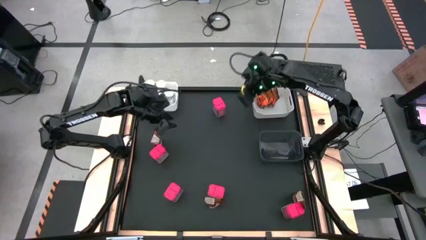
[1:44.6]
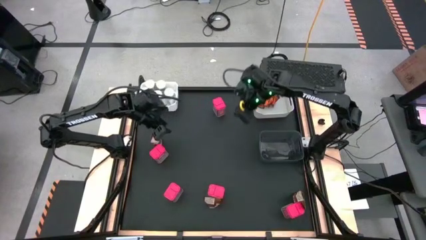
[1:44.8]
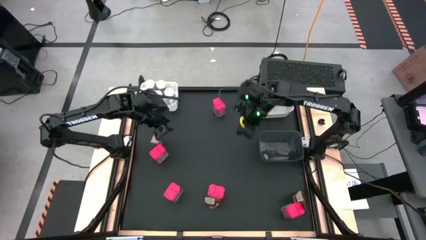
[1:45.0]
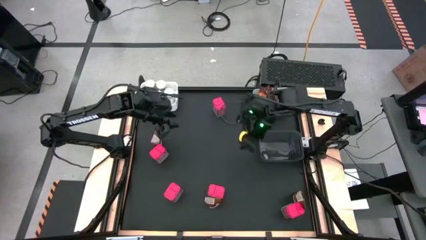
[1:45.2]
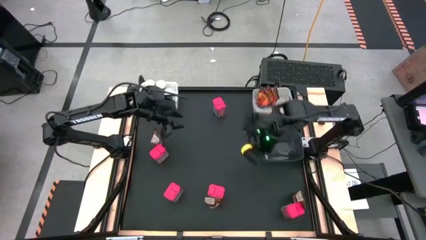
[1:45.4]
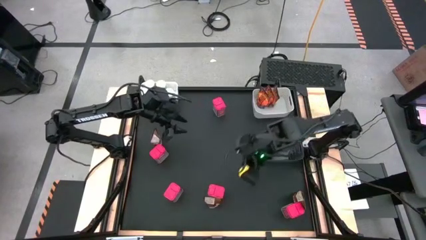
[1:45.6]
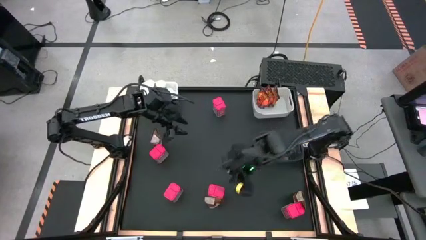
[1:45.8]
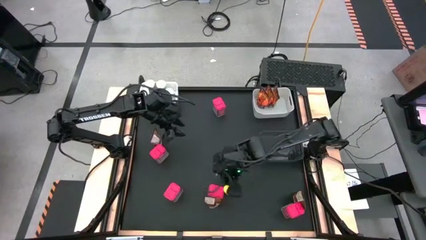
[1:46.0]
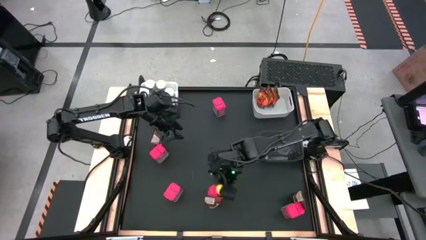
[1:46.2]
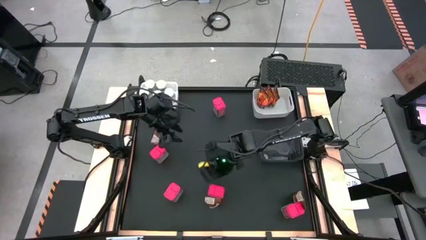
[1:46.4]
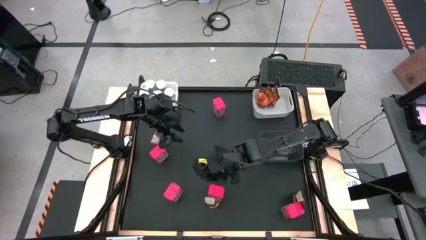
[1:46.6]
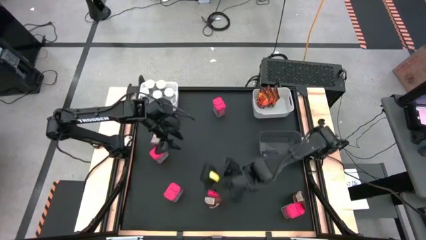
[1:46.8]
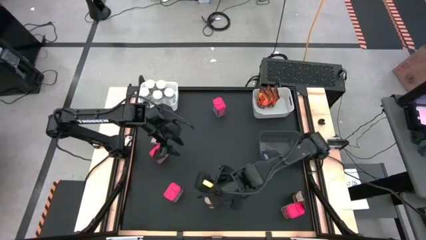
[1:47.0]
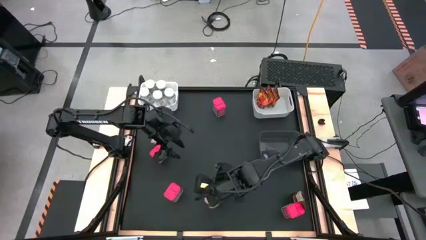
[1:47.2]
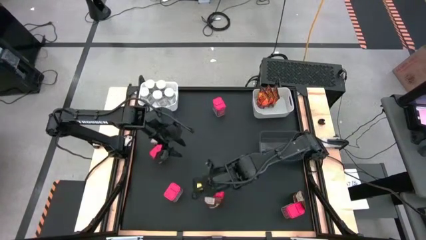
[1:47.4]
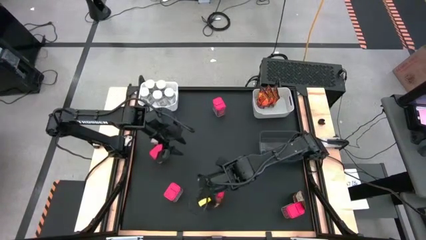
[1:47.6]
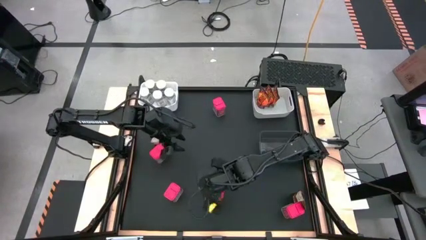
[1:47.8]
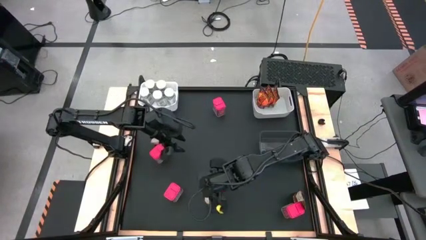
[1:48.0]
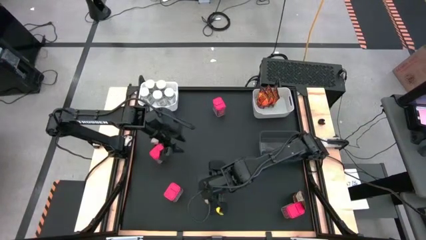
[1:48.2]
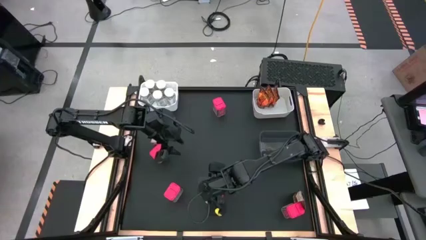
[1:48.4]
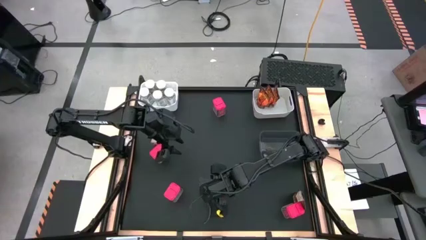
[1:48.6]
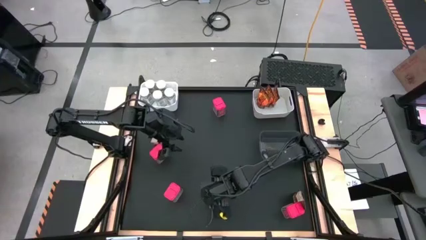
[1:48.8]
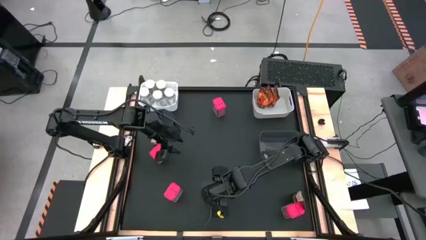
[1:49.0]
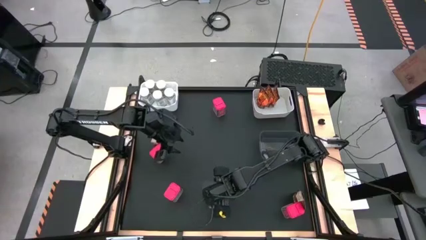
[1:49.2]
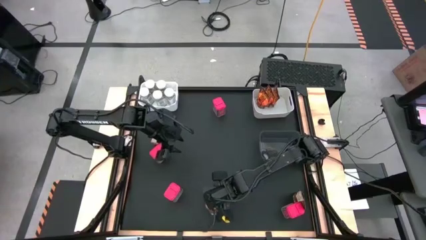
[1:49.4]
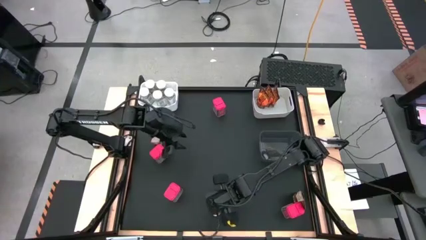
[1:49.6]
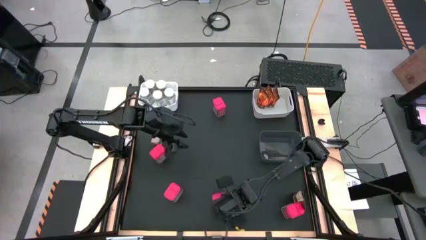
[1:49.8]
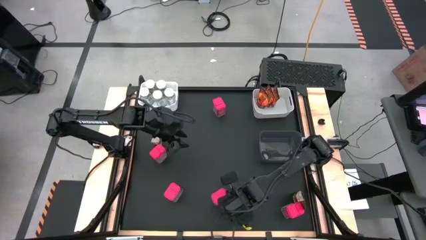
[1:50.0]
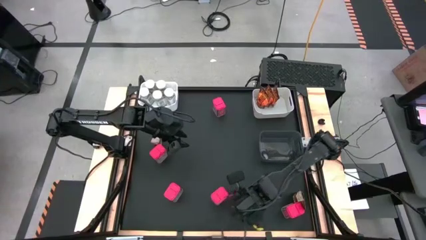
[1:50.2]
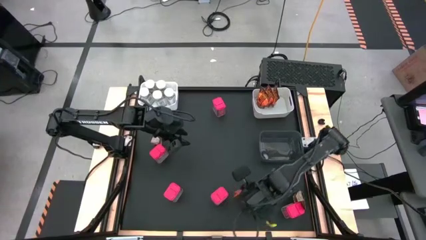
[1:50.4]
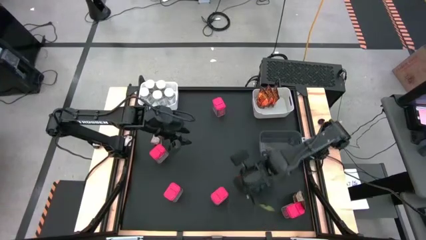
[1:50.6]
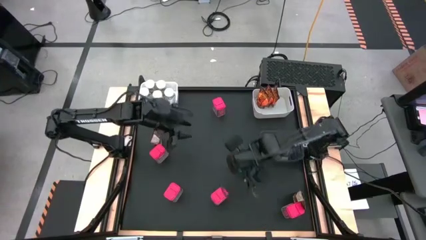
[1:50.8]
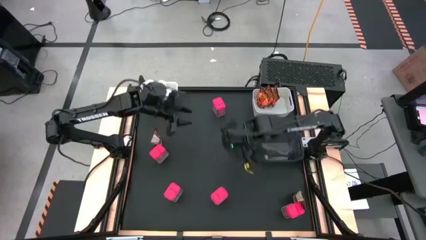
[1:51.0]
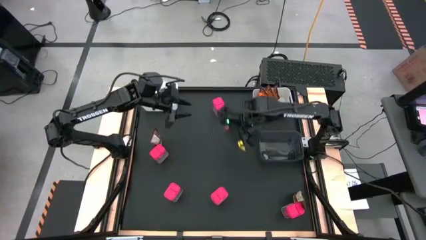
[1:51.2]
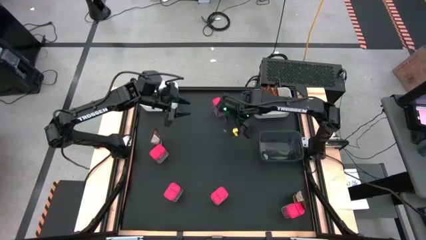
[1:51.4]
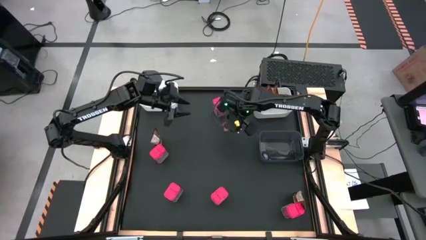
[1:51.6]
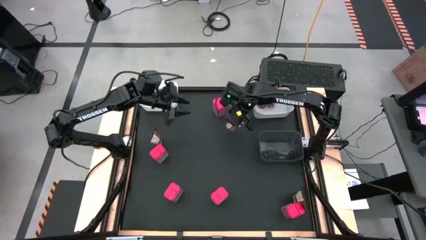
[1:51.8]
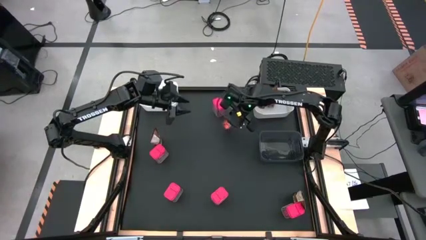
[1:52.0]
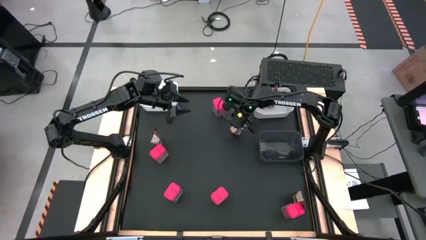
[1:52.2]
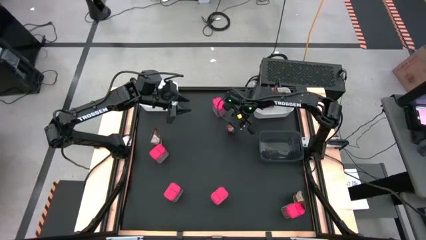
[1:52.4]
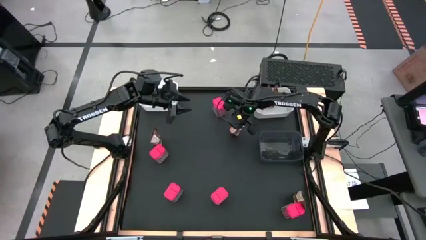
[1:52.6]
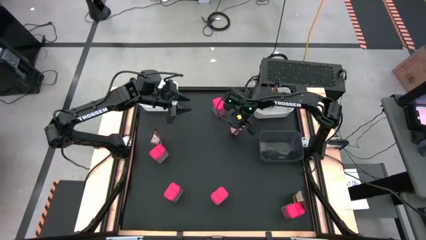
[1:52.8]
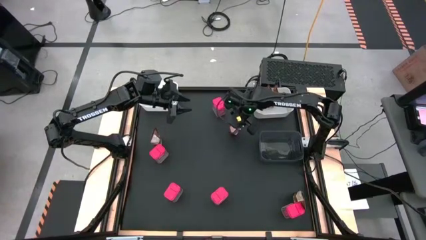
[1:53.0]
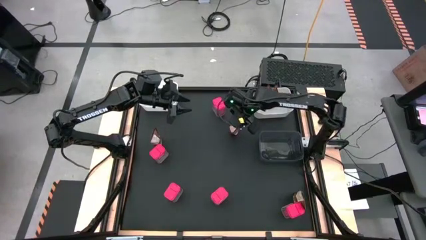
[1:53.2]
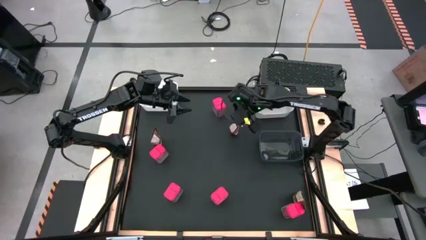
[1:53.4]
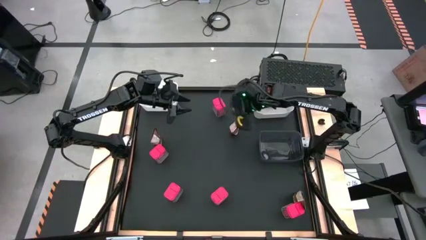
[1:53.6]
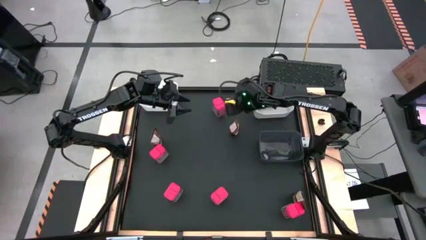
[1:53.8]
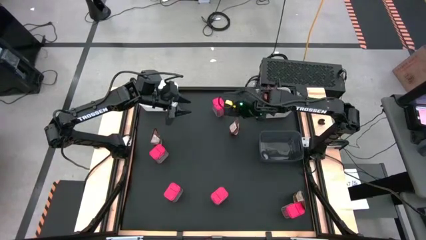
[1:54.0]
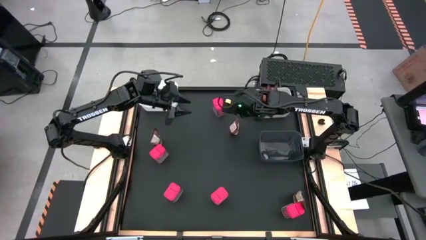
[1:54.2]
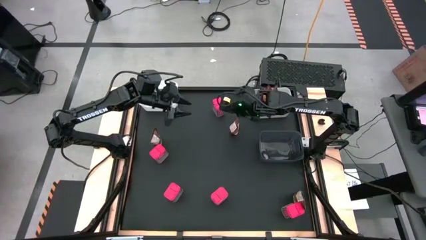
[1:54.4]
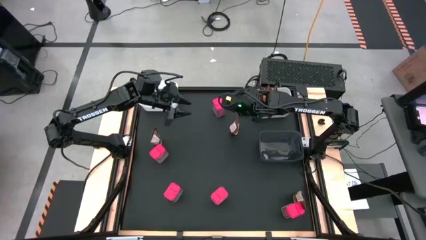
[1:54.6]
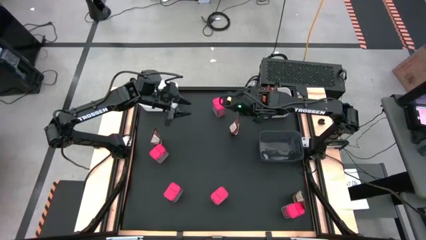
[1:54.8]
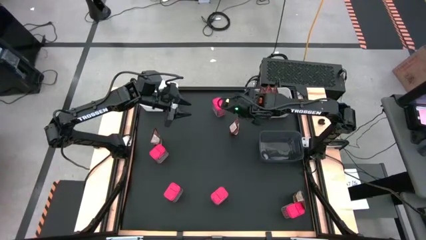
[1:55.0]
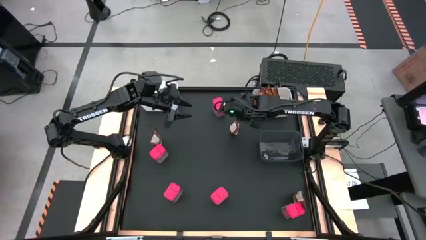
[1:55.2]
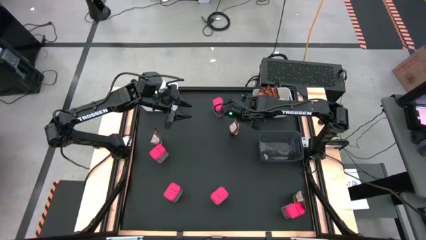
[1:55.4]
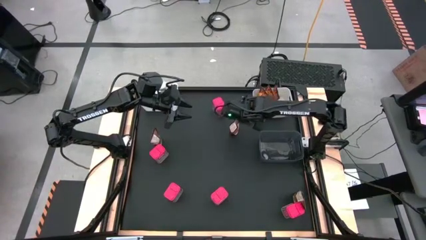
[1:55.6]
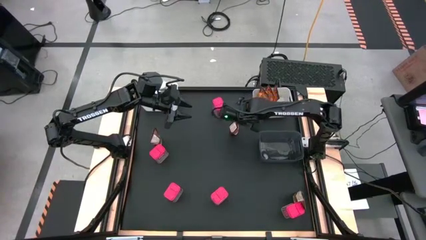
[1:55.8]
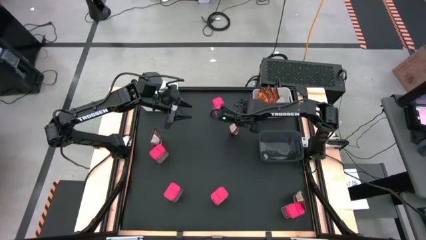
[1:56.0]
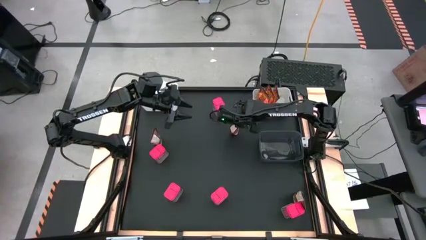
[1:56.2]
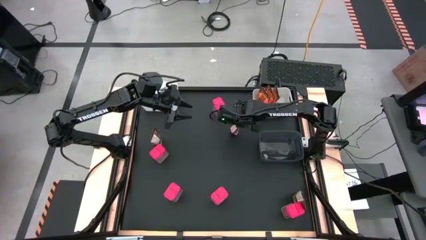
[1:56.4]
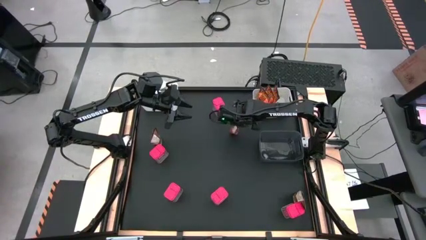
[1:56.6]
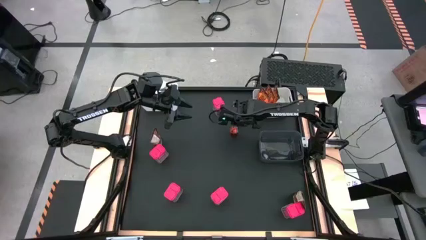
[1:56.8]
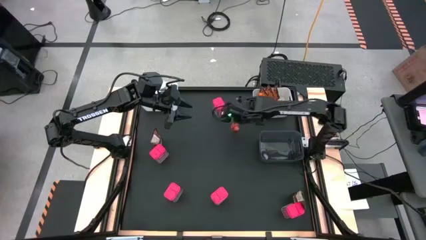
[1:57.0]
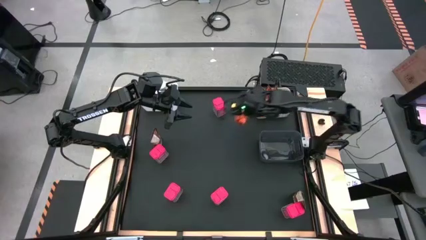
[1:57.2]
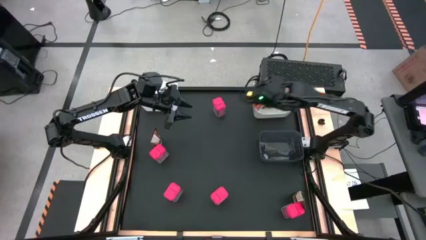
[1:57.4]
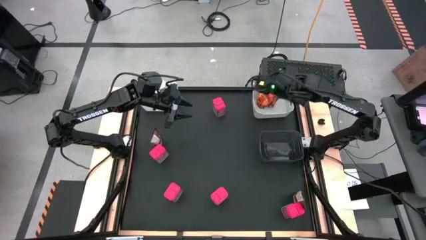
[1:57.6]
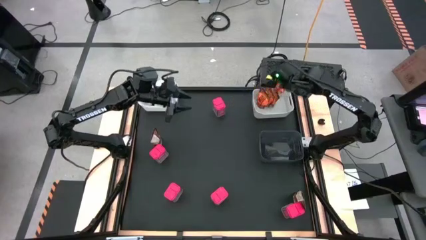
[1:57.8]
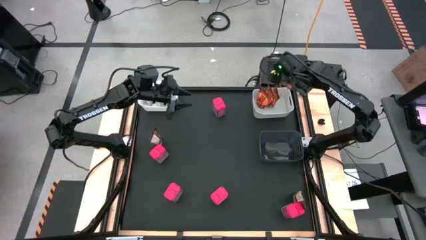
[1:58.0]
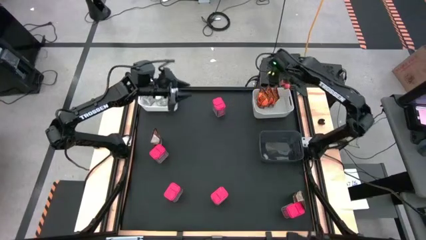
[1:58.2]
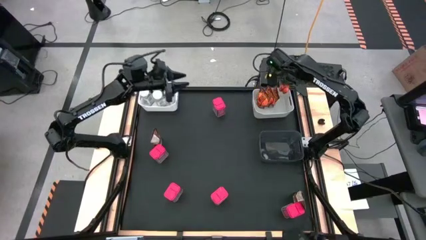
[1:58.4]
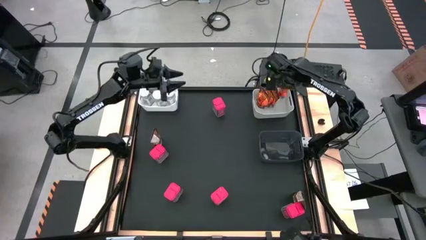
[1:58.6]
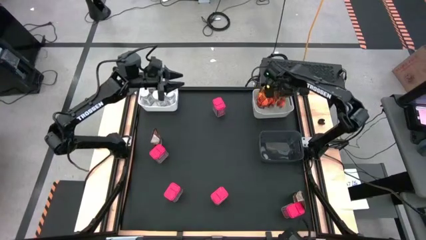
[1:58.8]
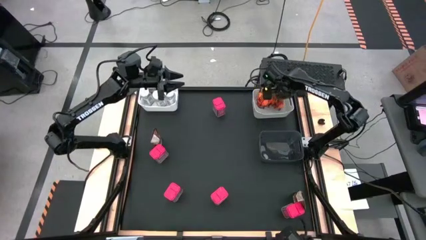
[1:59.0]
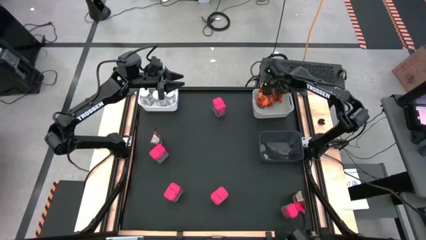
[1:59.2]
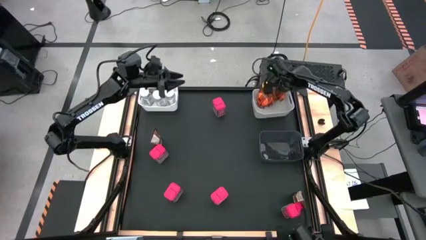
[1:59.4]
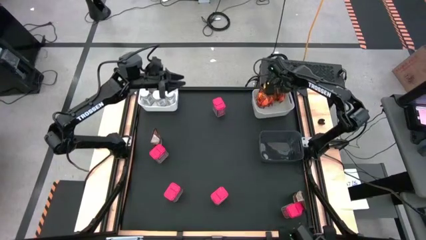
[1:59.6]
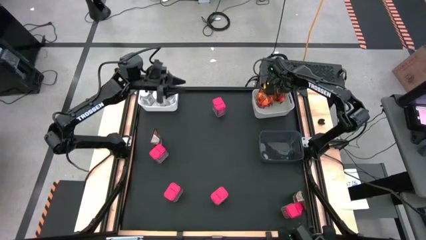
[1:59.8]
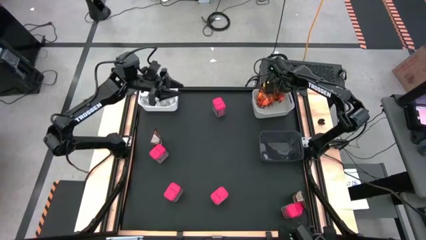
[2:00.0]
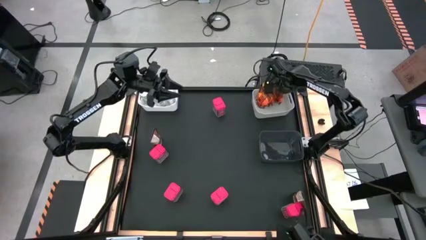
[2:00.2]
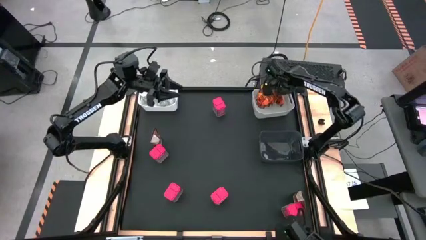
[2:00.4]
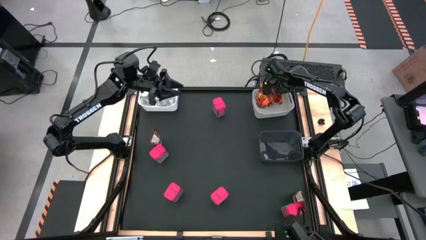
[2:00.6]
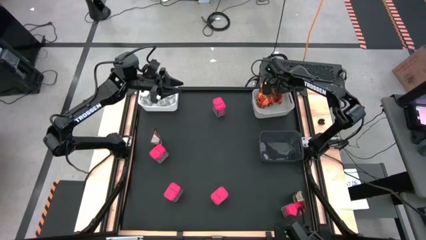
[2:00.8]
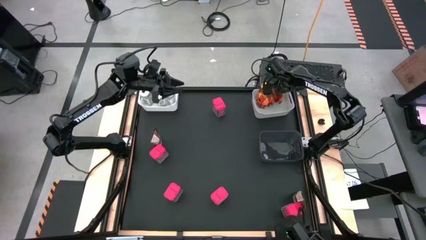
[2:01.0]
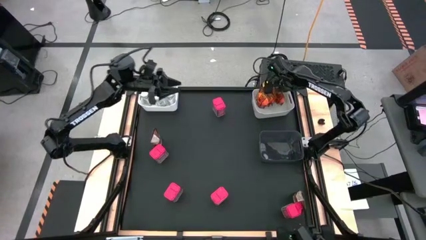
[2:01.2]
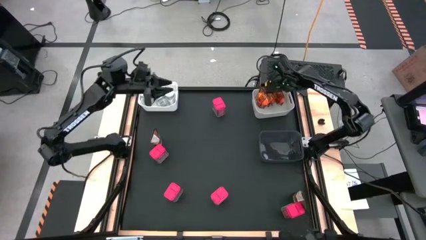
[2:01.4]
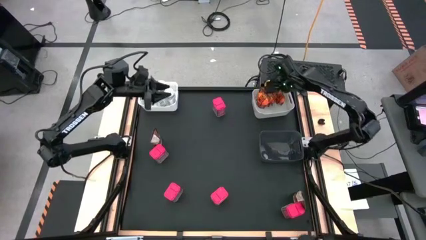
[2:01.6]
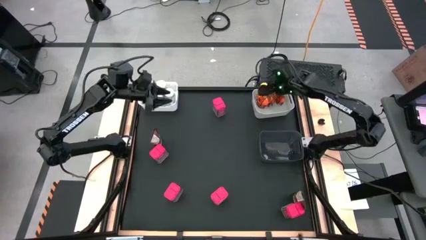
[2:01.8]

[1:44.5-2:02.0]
Task: Sort spices by type
Put the orange seasoning bag into the right white bin
